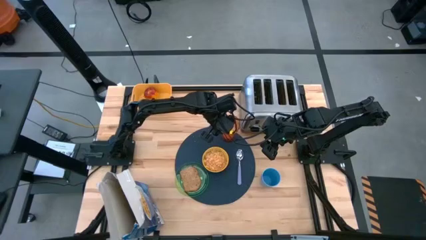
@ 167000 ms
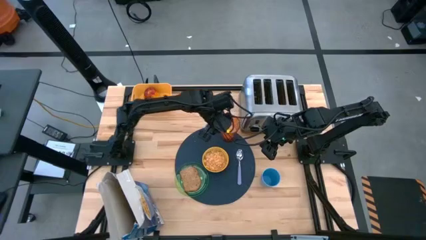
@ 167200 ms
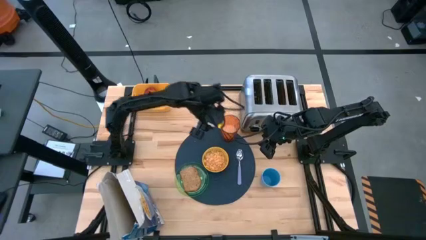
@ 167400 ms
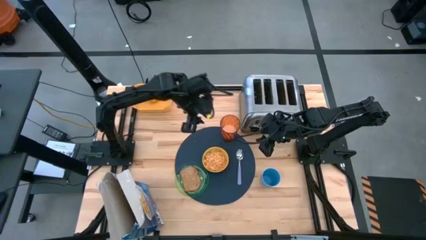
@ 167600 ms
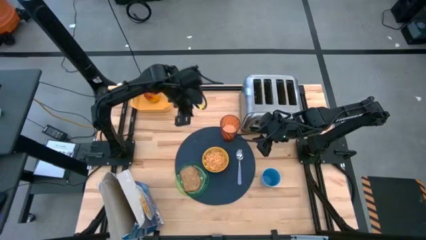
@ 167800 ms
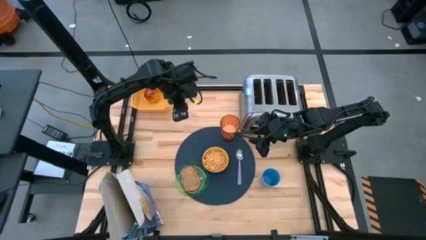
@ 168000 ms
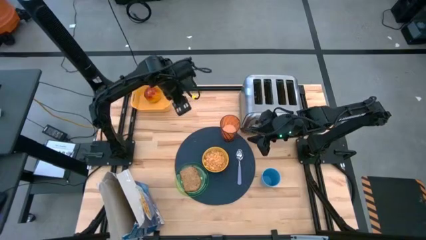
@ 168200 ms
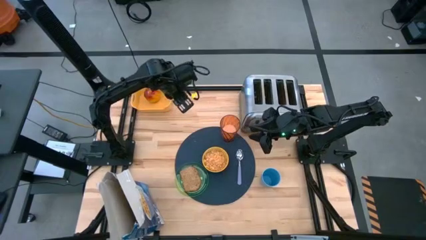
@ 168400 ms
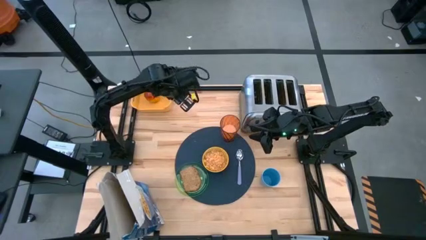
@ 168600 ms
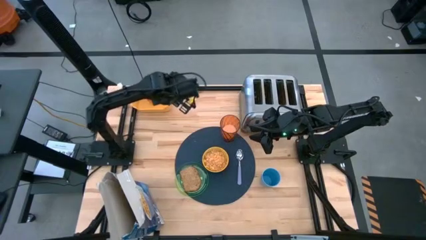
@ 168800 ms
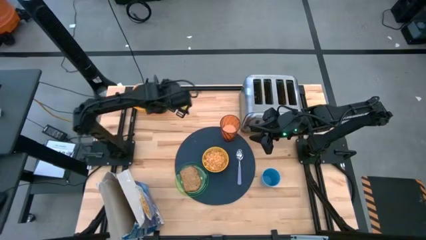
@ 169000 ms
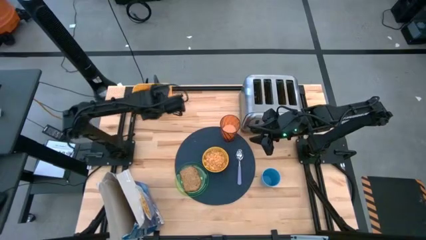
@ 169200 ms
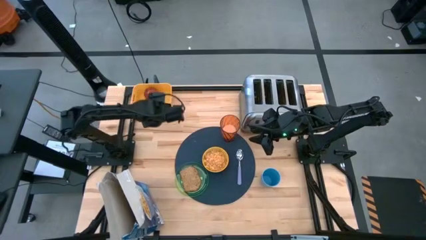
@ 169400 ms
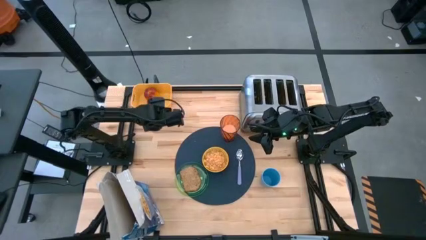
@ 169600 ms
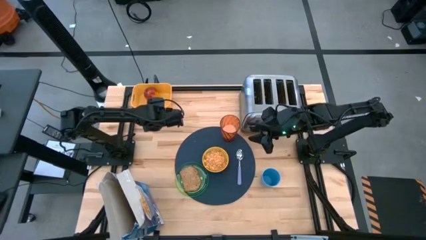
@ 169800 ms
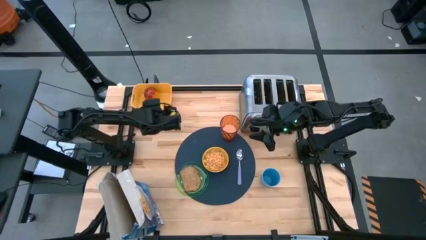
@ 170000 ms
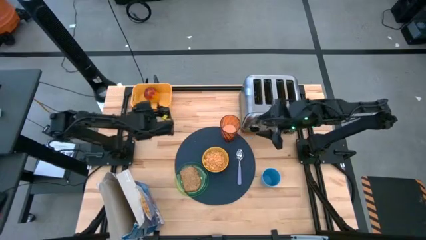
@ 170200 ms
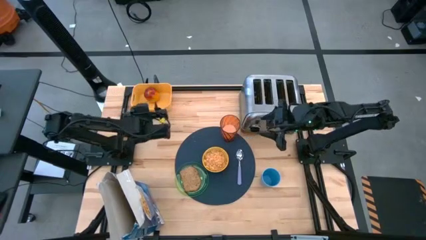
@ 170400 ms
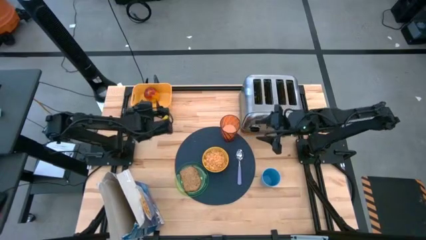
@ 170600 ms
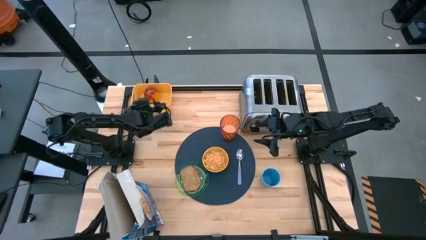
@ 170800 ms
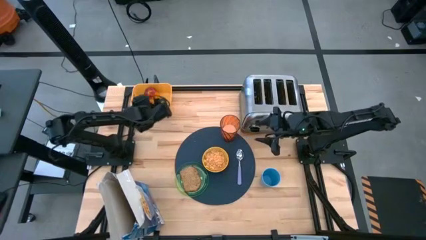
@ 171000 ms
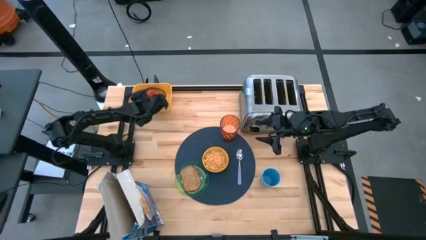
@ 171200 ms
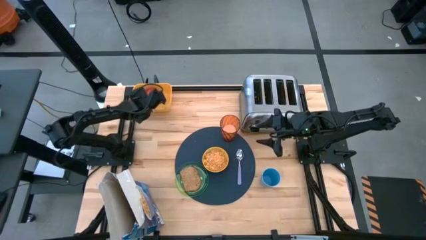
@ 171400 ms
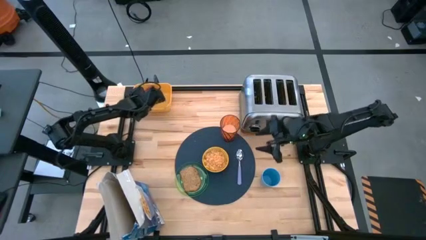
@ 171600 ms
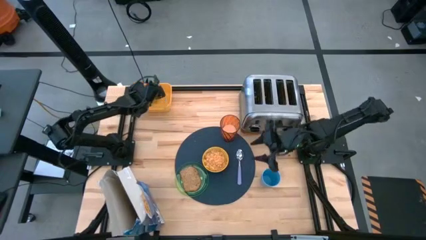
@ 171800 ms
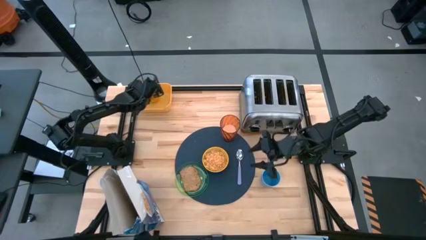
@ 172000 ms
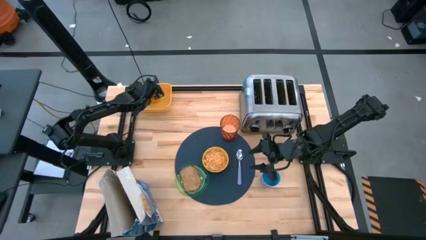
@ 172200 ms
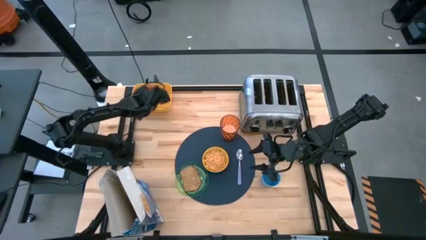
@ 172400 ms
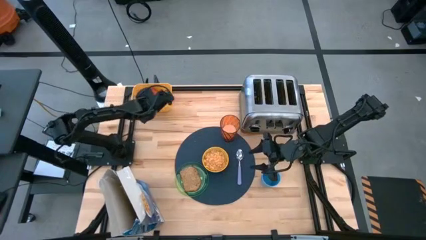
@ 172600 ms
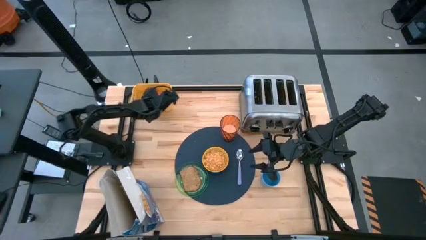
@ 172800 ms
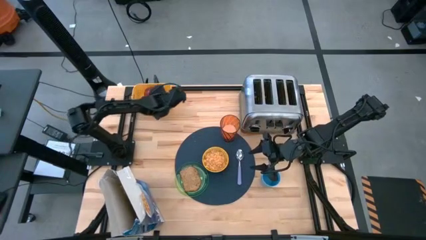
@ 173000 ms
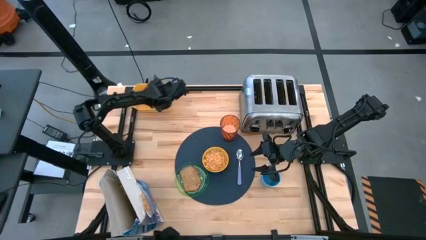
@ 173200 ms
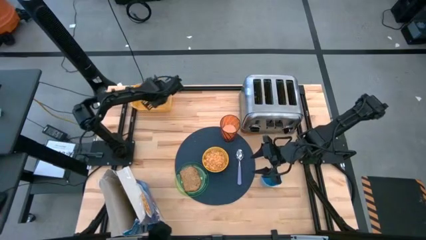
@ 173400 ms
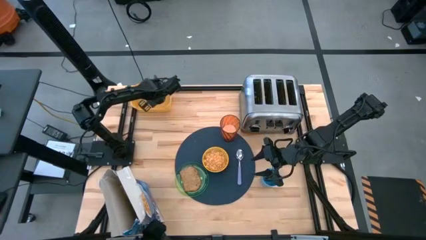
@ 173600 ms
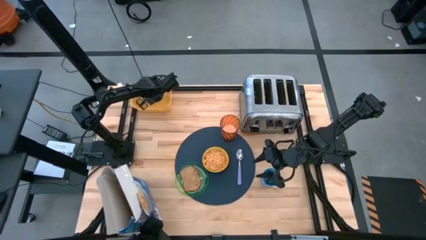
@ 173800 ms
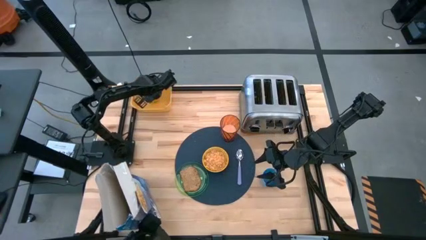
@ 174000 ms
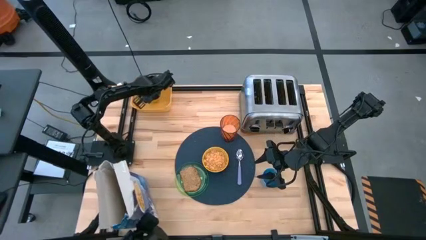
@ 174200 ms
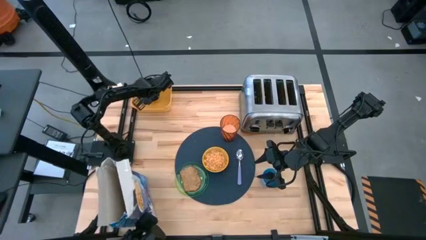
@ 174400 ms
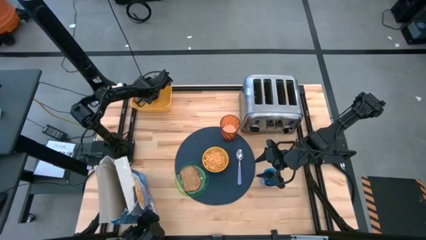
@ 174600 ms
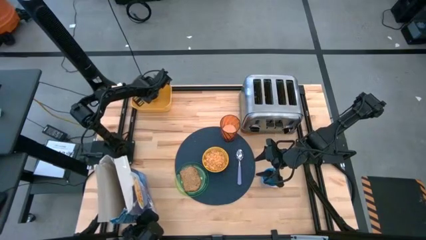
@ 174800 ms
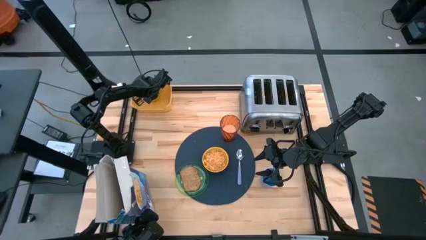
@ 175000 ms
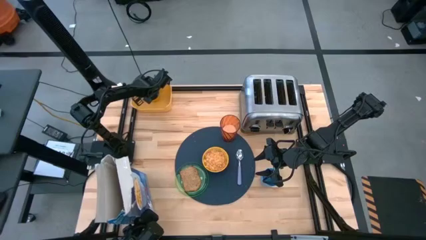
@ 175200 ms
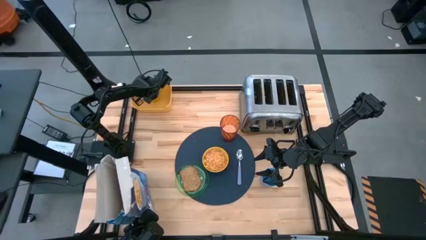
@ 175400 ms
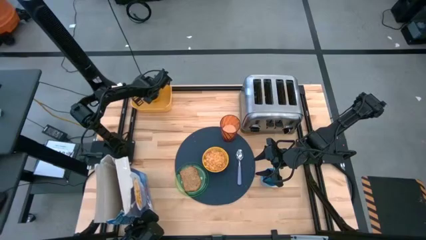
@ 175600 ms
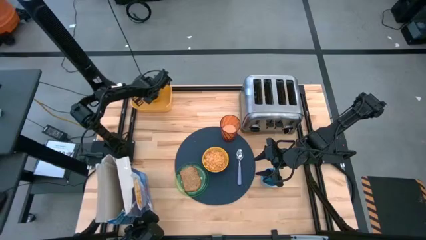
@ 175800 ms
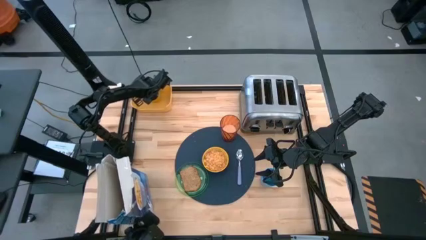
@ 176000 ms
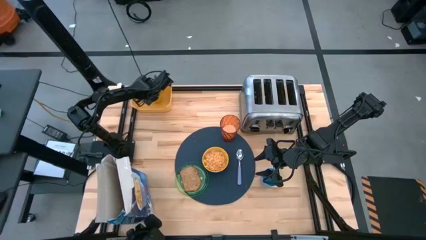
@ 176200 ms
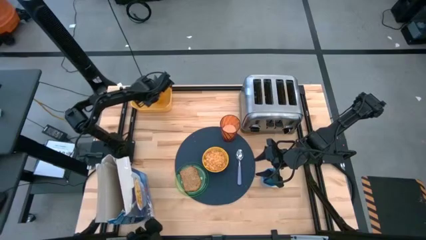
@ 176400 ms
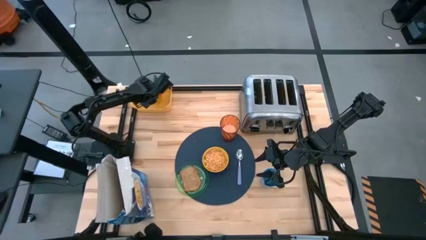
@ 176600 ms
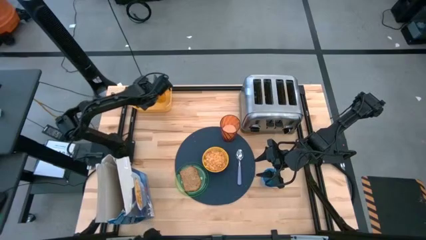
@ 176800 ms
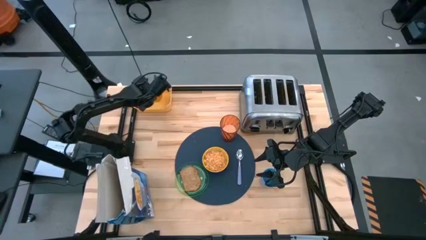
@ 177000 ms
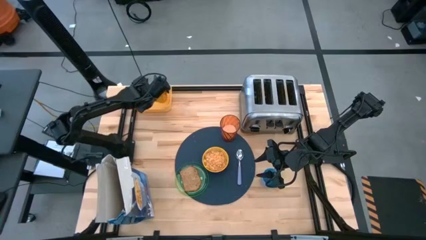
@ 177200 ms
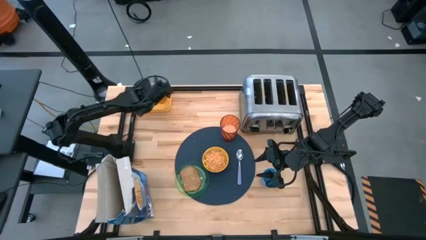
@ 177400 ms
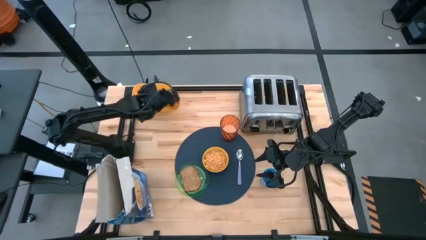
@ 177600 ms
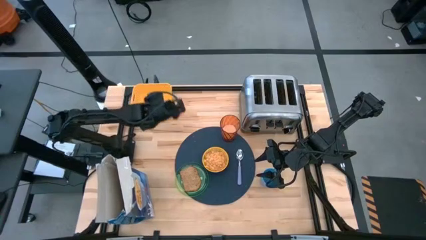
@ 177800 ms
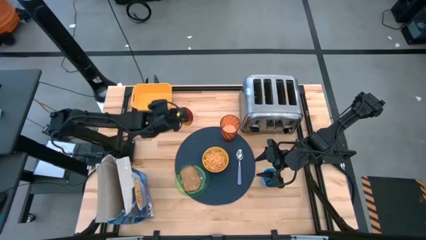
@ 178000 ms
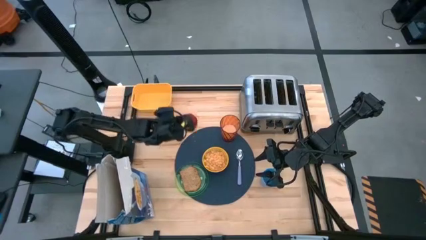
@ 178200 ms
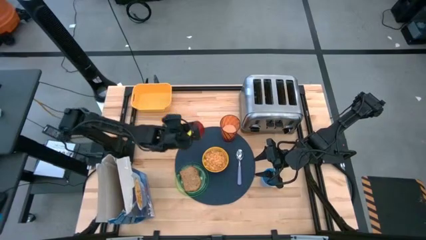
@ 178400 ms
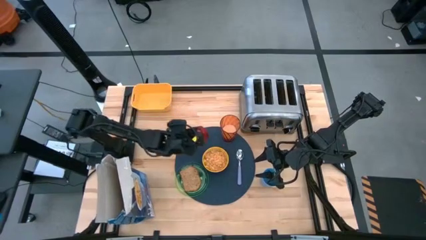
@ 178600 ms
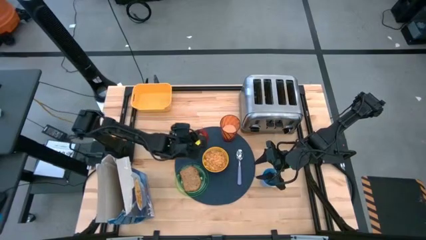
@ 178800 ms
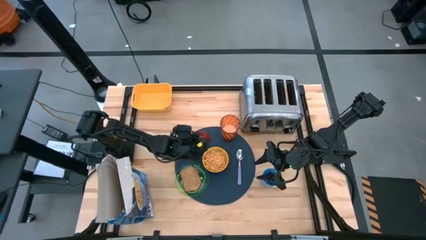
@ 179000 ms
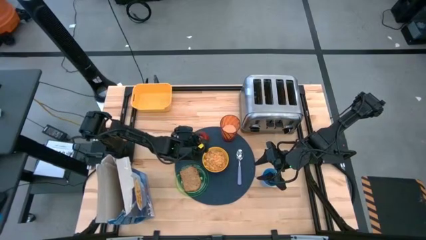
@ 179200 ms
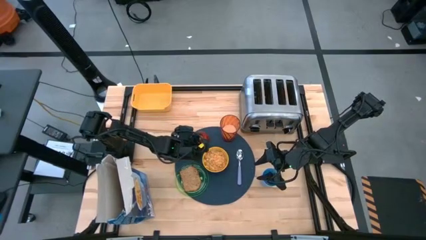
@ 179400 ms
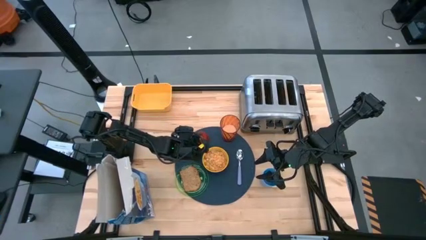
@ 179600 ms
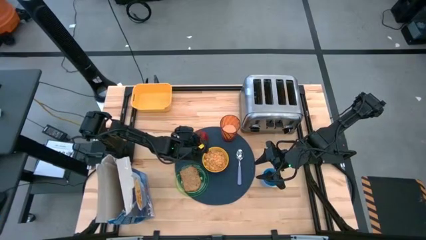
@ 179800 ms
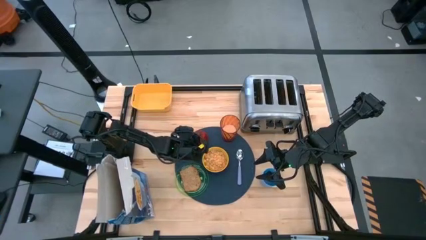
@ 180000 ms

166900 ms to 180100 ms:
Task: Arrange a breakfast setting
Put the apple on the dark blue table mat to the left of the orange glass
